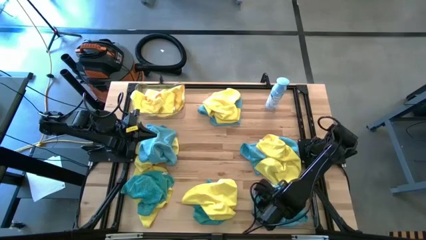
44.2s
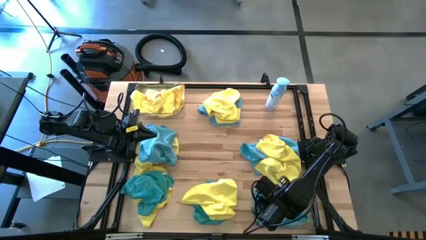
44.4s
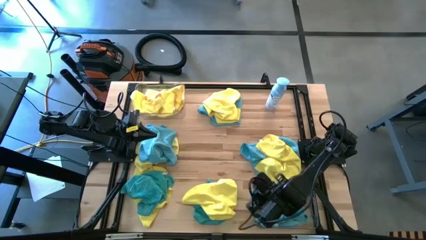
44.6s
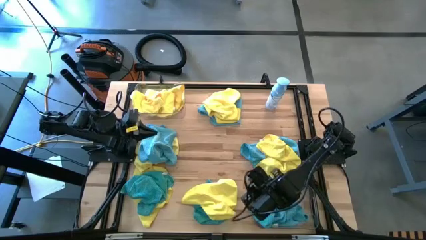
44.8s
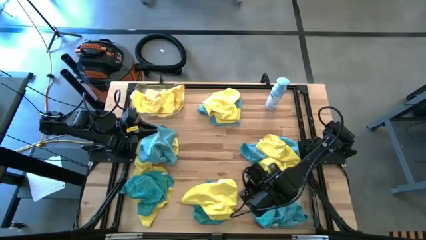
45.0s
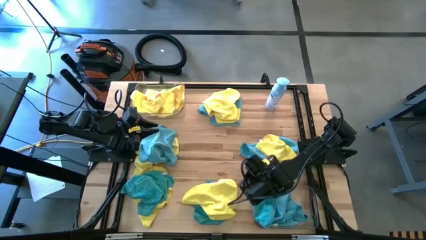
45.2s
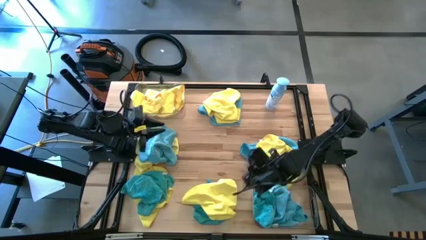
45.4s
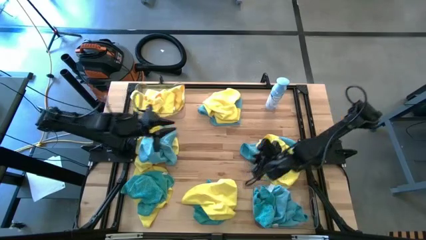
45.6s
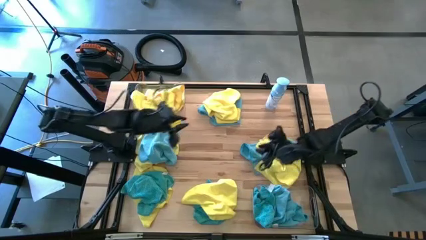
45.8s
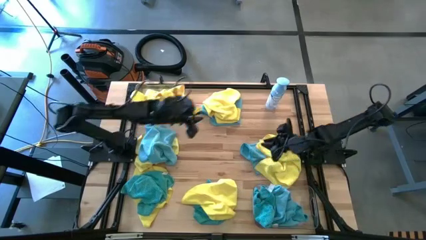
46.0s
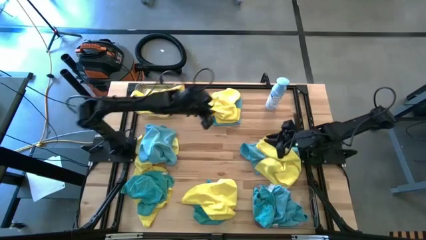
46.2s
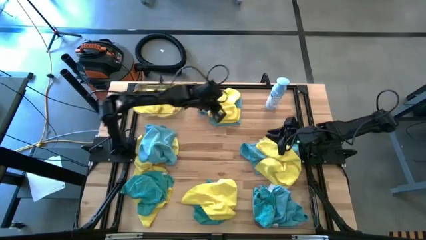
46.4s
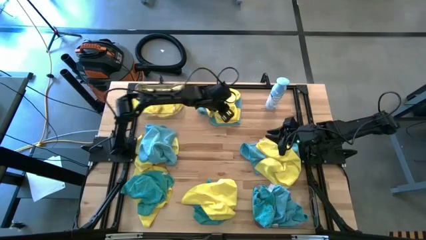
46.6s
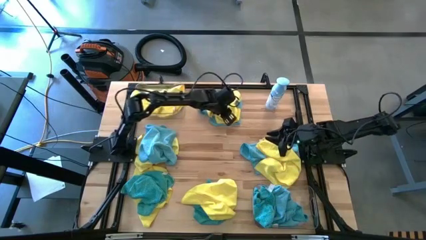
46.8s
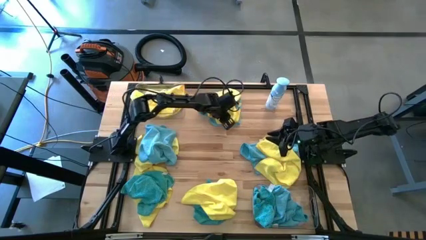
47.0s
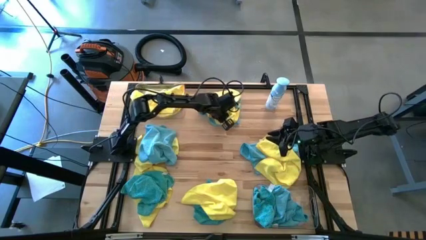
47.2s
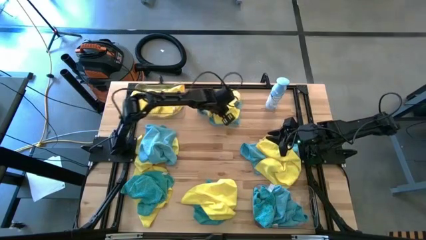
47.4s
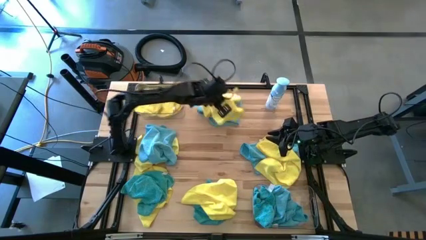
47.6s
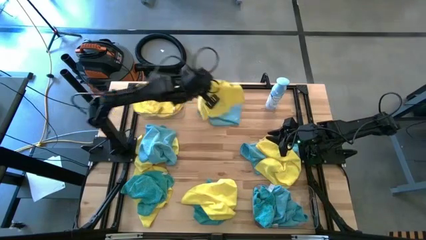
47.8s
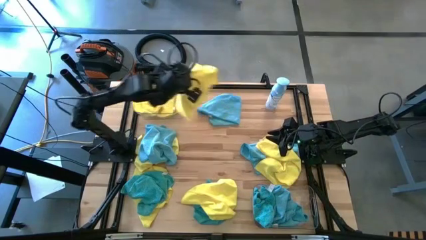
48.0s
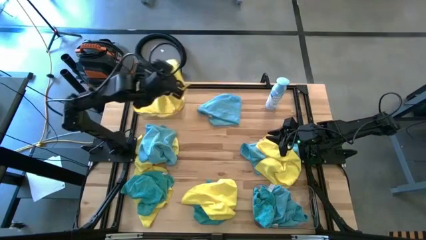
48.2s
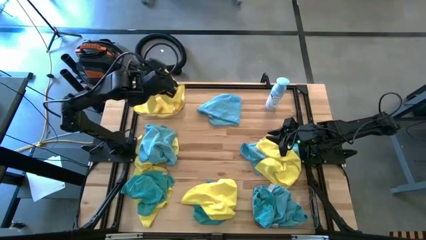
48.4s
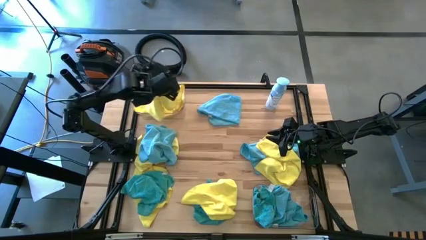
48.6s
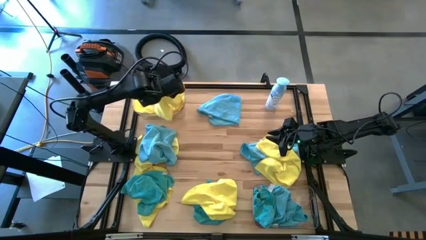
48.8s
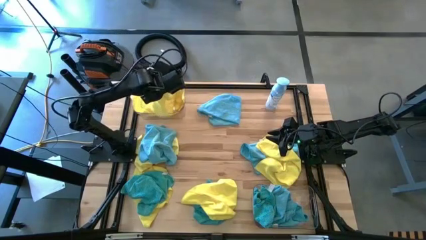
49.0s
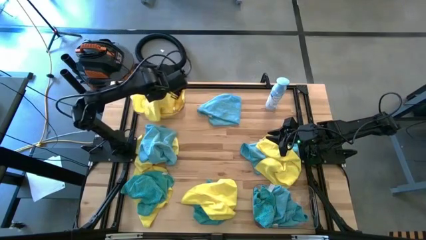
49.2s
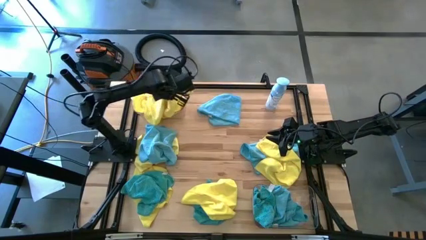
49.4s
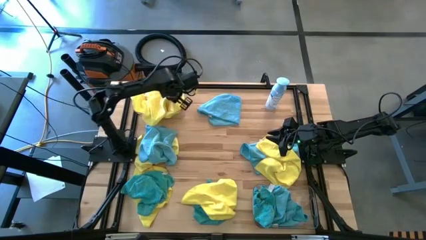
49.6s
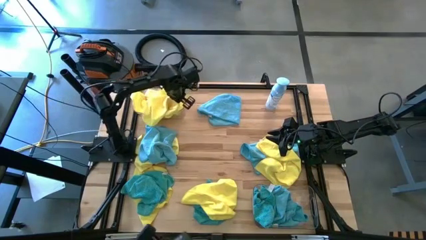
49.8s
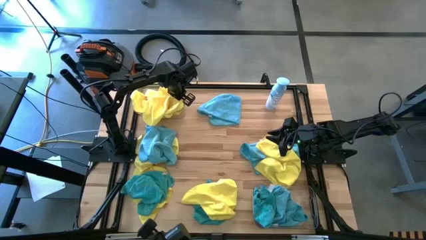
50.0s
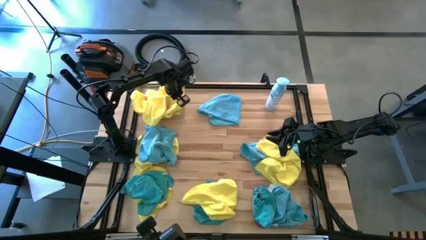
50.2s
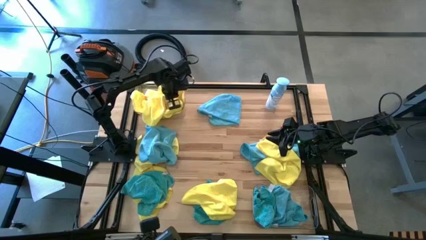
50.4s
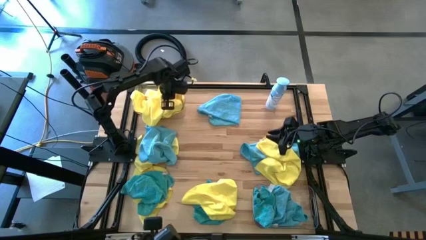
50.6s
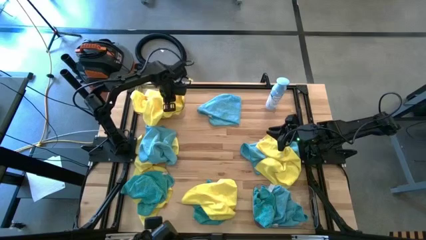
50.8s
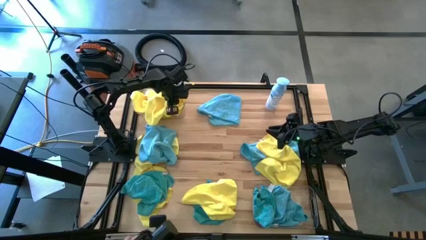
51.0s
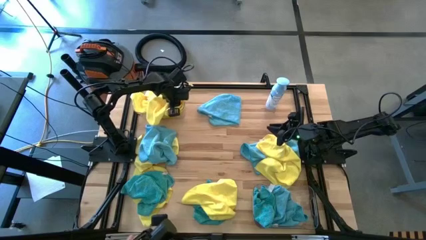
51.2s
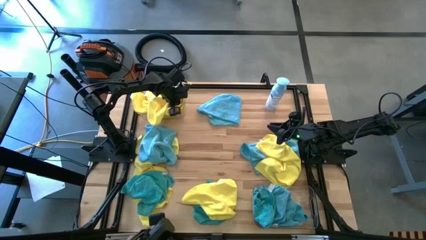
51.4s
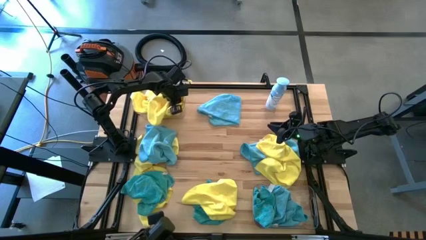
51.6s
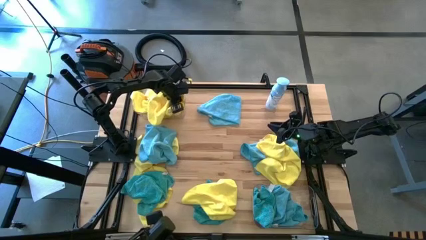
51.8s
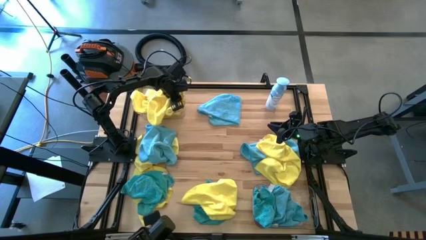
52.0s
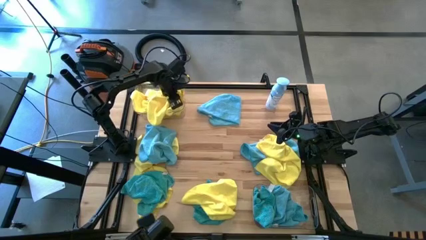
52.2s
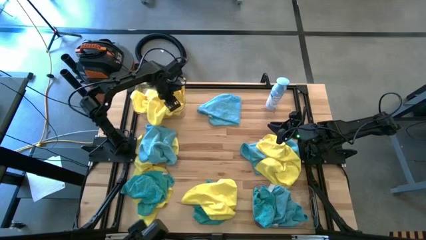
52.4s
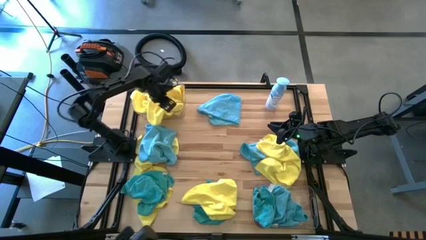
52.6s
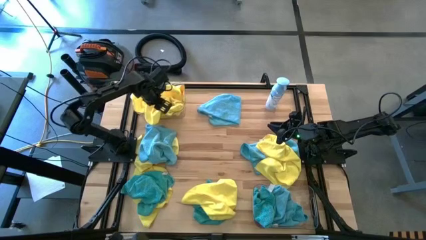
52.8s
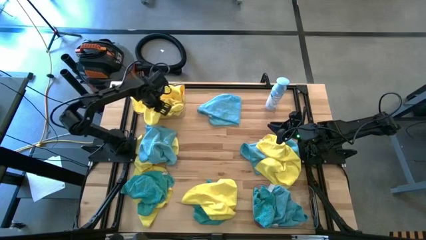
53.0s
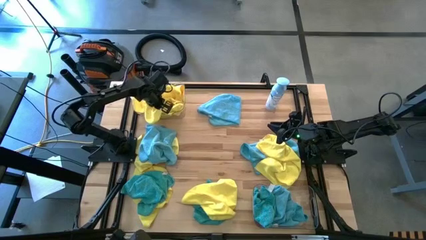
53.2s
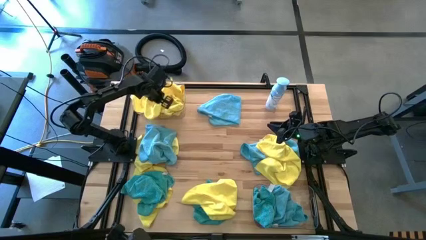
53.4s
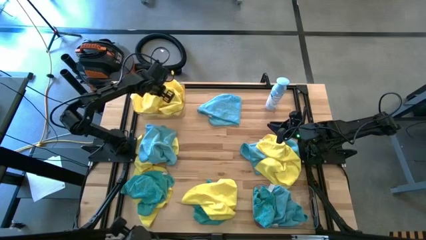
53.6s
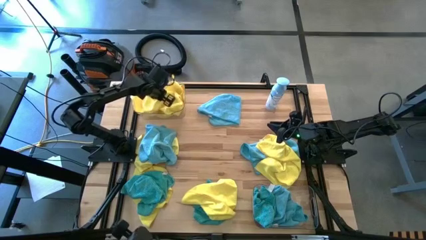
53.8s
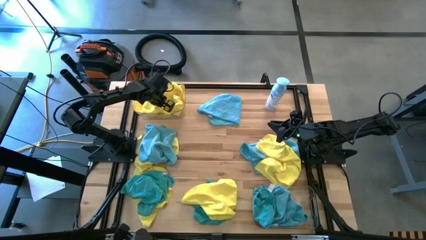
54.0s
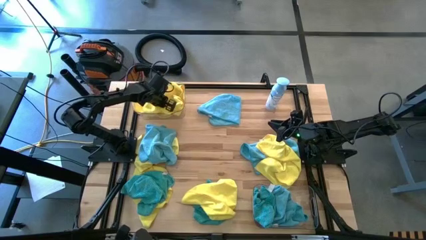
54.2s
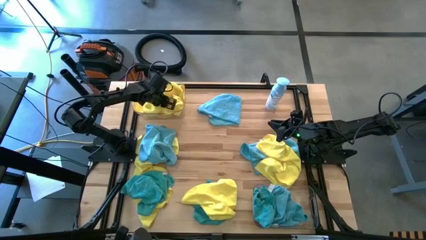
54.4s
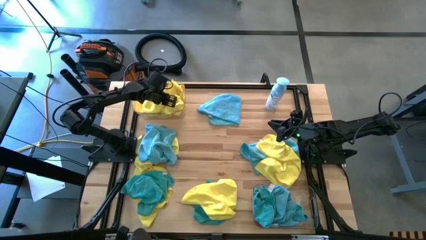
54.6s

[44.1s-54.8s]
Task: Sort microfiber towel by color & place in baskets
Put the yellow towel into the top transparent bin
